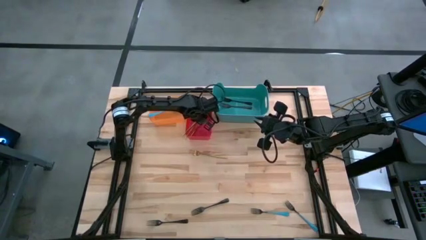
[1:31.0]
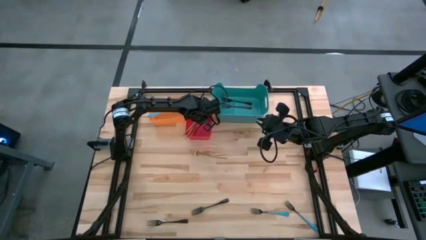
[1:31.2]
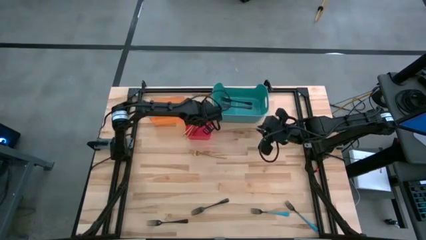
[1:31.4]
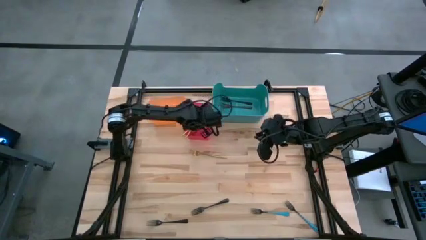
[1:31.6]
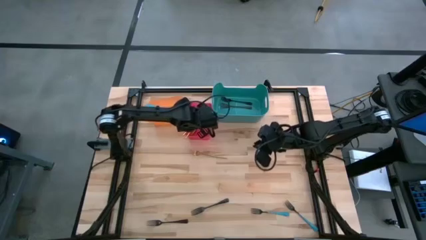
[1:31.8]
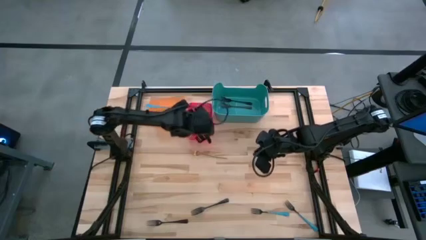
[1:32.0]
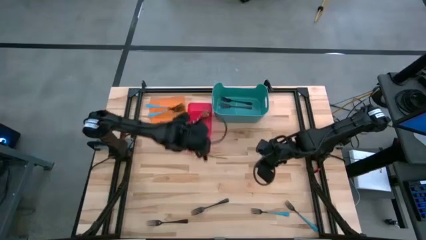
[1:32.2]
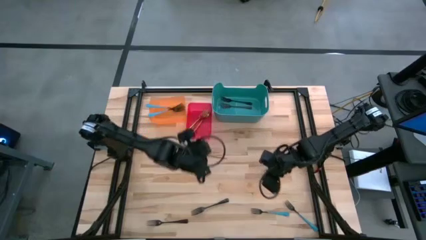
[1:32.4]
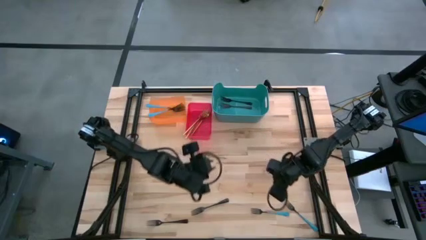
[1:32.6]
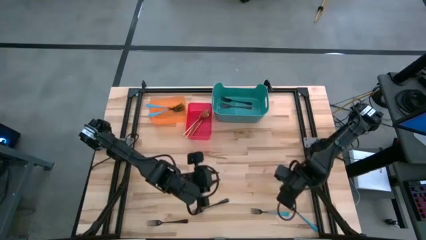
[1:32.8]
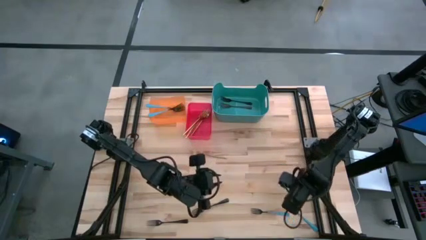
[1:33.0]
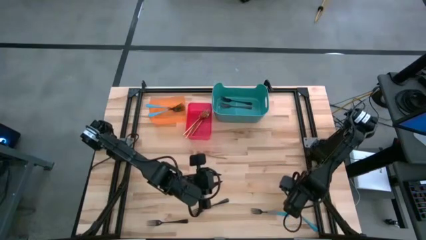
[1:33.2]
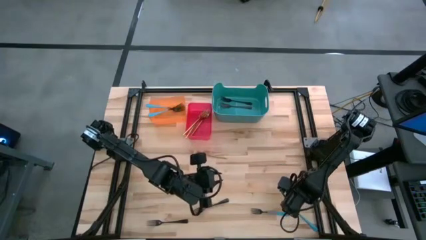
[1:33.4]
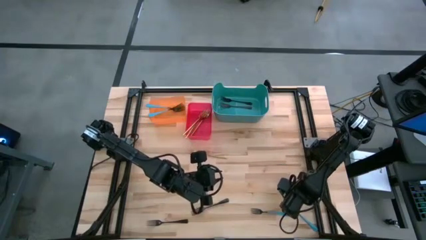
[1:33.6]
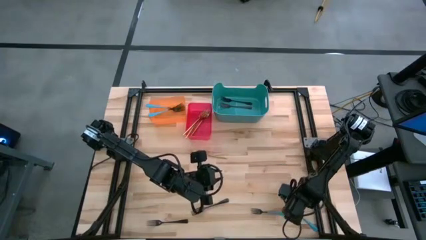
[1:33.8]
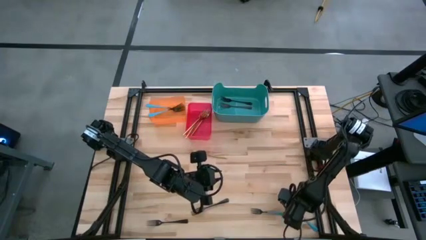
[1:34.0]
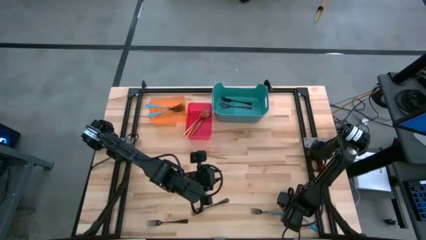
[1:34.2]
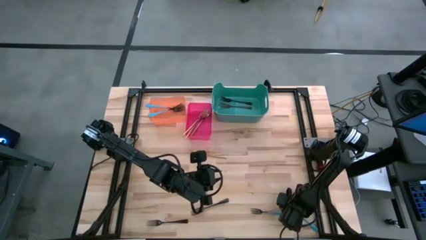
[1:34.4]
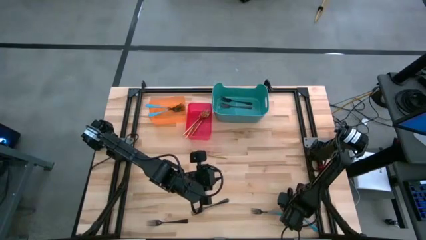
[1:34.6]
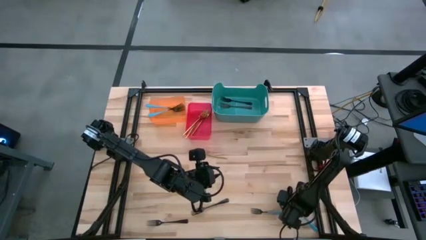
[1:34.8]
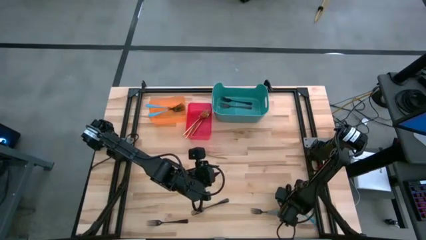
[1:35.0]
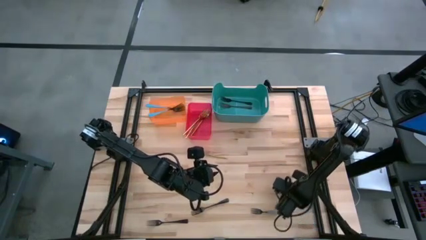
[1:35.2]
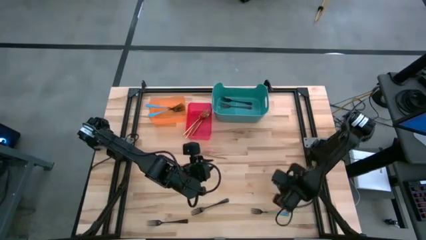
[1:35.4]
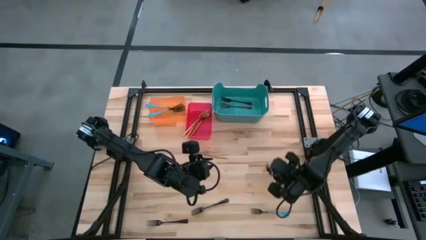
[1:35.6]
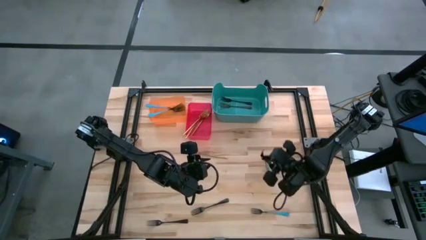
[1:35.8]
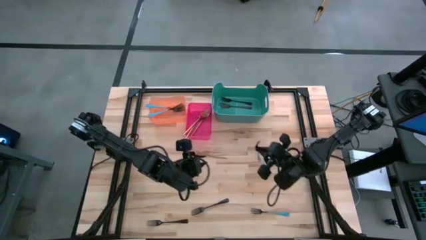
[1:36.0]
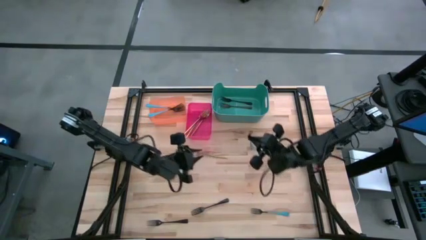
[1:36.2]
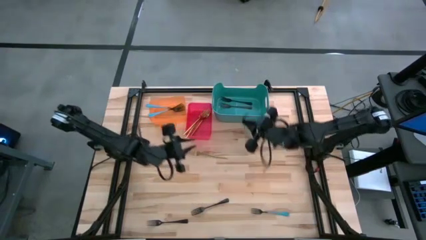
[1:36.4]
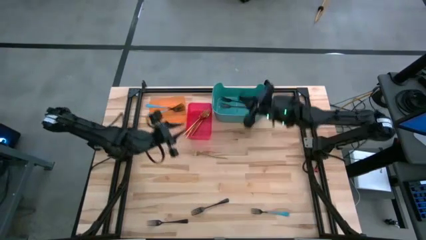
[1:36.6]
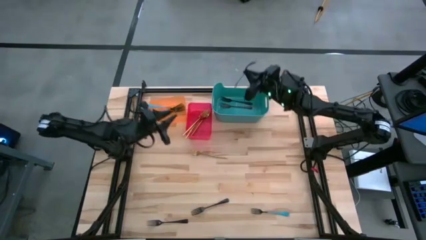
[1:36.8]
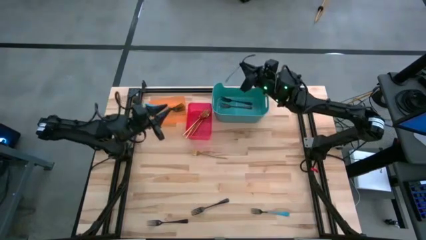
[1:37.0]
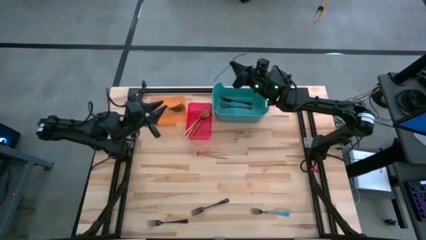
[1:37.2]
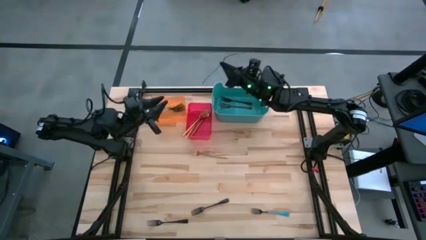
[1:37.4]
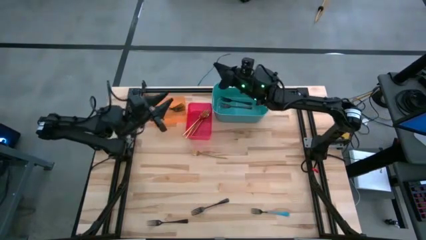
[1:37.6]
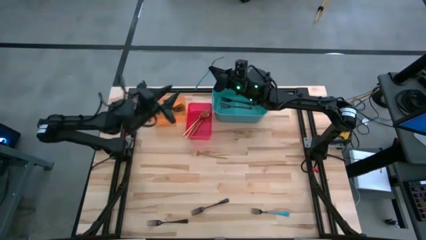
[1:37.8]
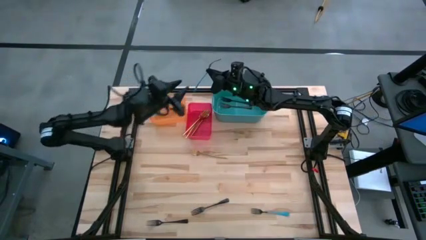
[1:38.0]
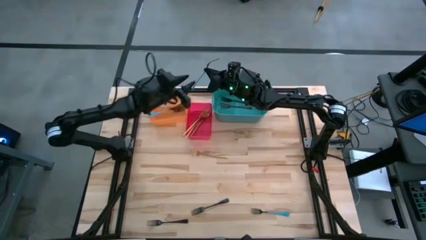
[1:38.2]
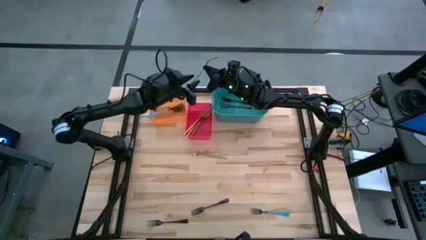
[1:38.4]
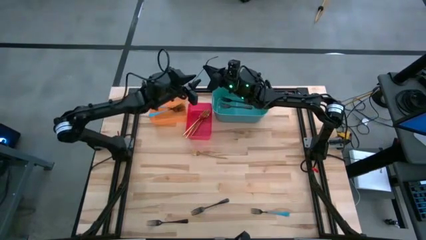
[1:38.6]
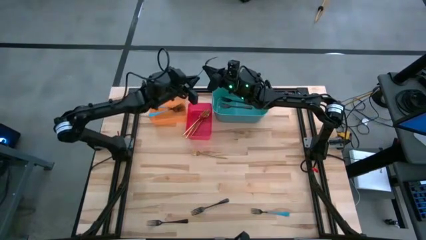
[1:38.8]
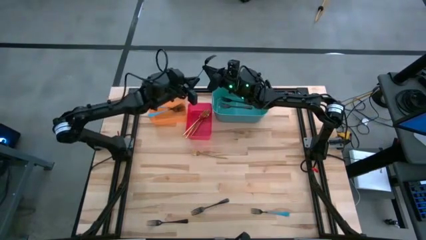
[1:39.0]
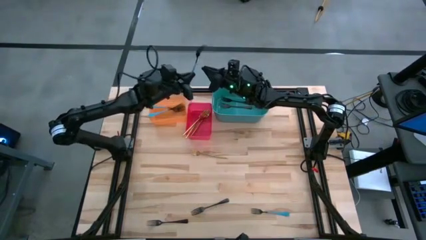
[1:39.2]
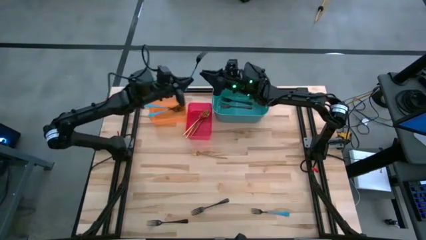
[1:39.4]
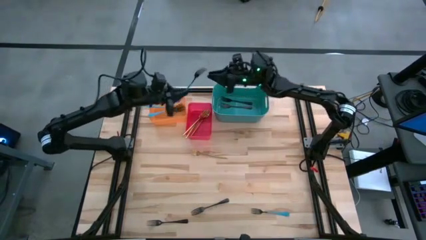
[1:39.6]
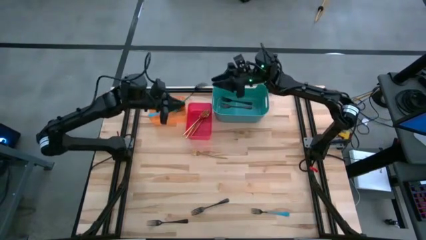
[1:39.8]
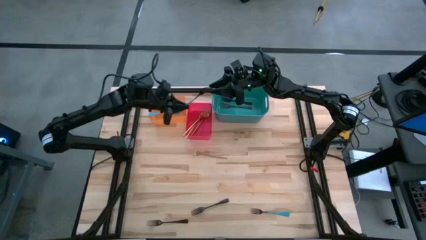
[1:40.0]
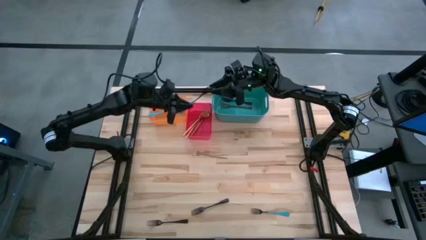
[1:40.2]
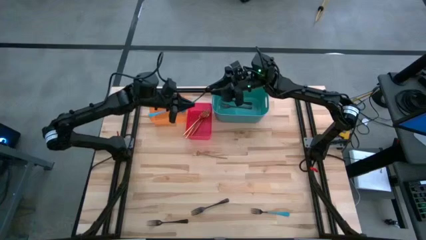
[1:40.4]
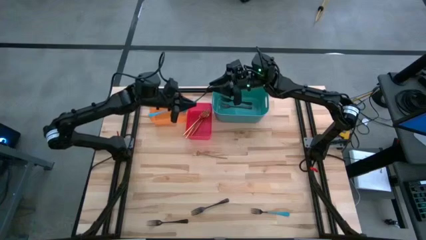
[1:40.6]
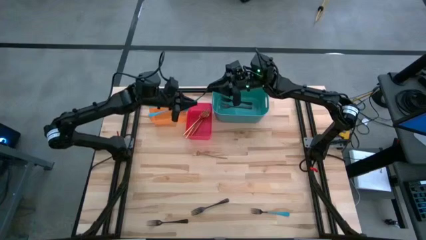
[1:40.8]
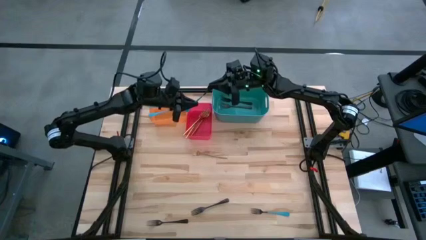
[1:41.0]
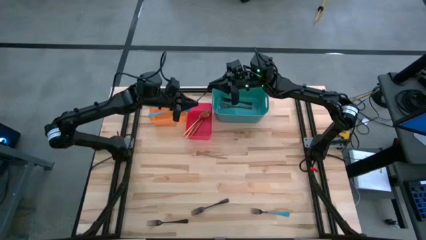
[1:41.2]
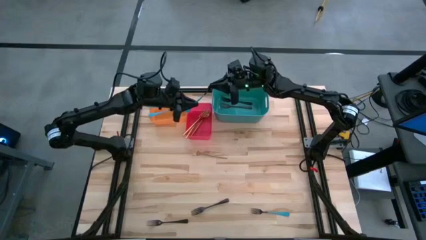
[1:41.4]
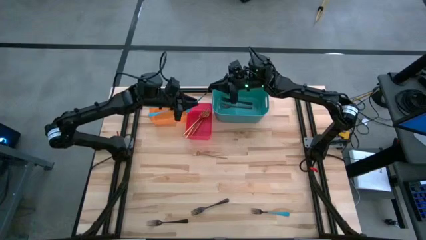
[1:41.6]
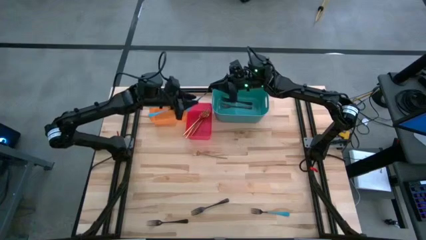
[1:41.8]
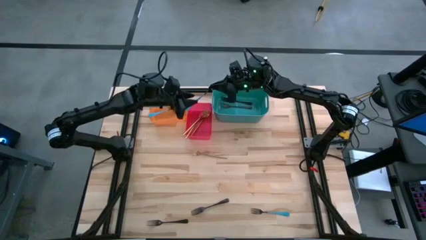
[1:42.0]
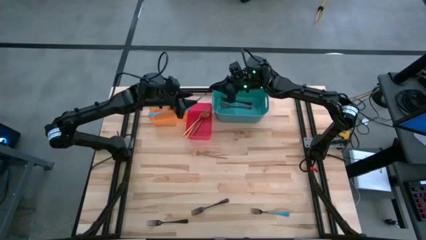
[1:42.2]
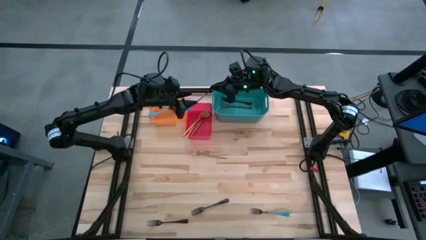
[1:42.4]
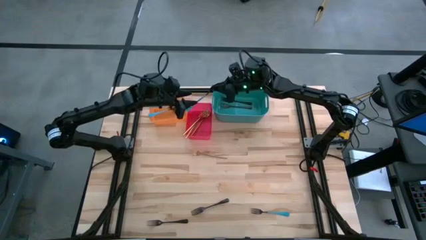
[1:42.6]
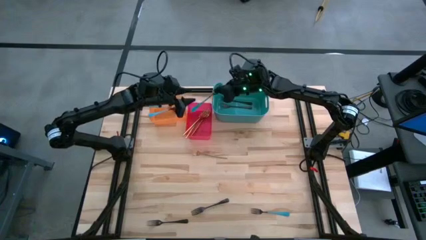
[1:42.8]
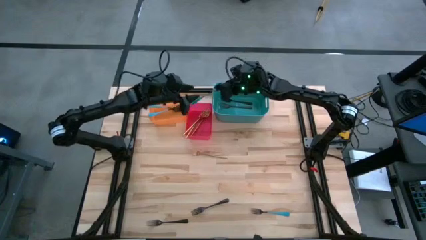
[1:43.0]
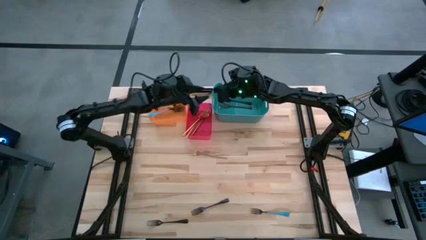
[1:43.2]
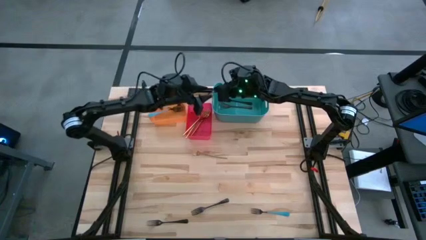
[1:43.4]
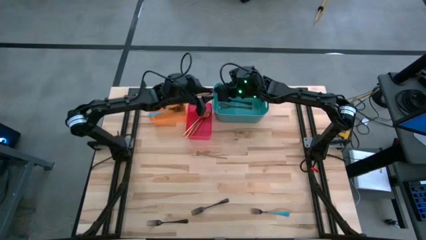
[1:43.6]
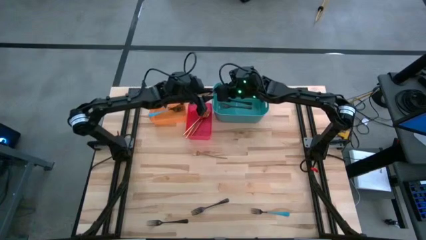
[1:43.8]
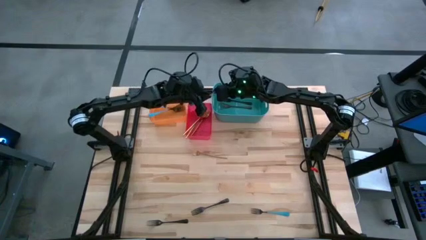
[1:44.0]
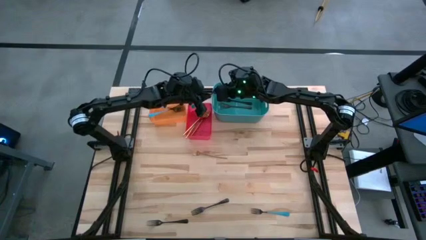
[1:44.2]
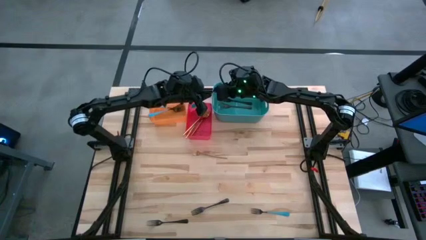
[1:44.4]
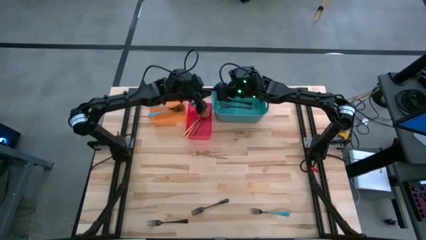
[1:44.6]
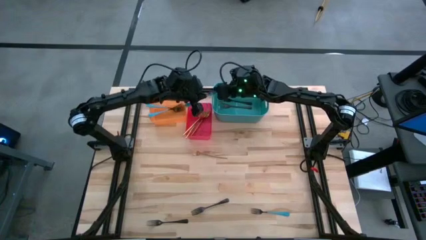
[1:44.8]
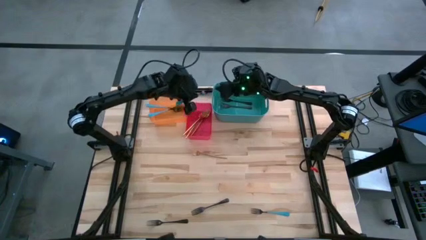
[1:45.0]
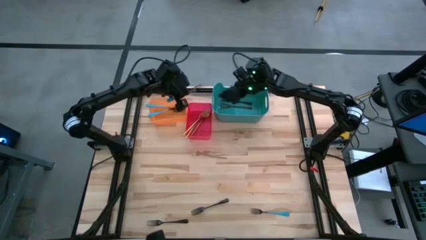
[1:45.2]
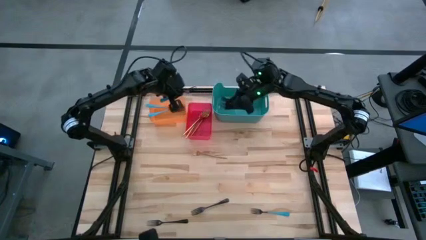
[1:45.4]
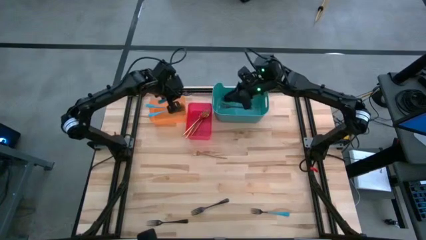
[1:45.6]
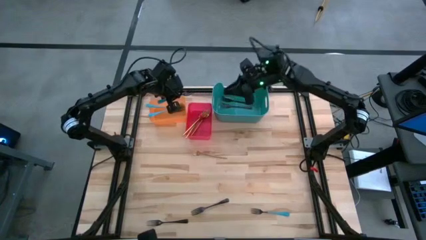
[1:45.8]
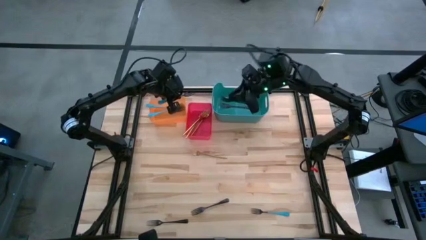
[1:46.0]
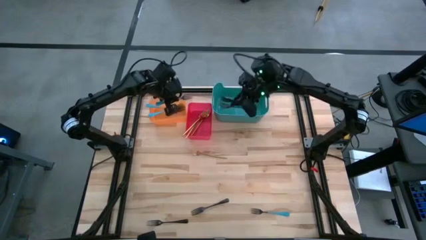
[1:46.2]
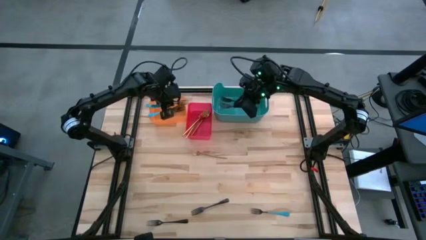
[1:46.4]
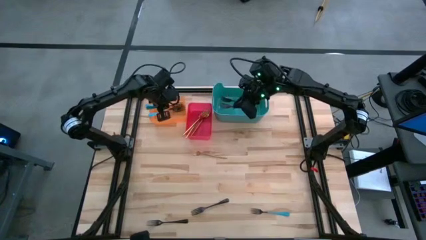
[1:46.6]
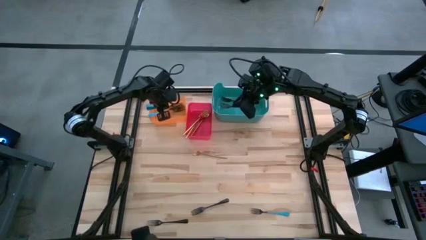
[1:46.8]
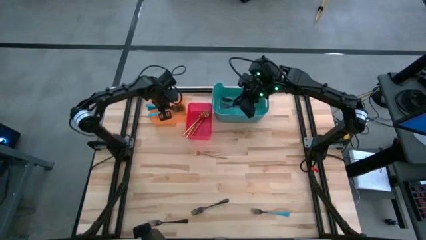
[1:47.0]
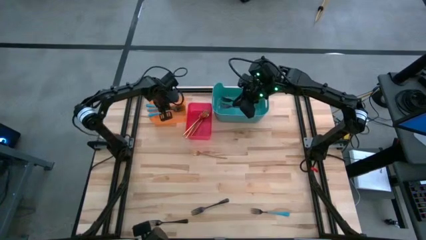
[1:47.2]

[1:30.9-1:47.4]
Task: Sort silverware by color (type)
Put the blue fork into the orange bin
